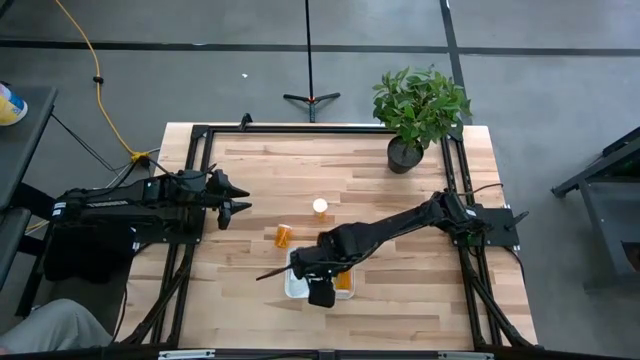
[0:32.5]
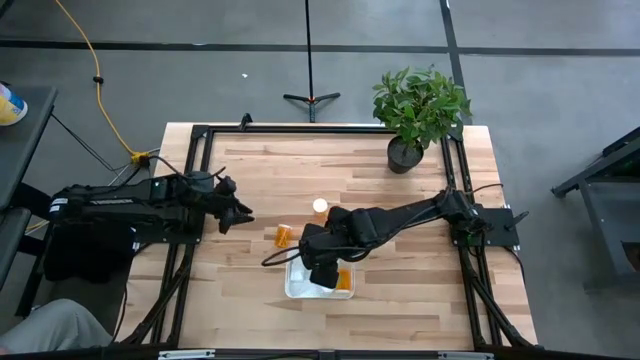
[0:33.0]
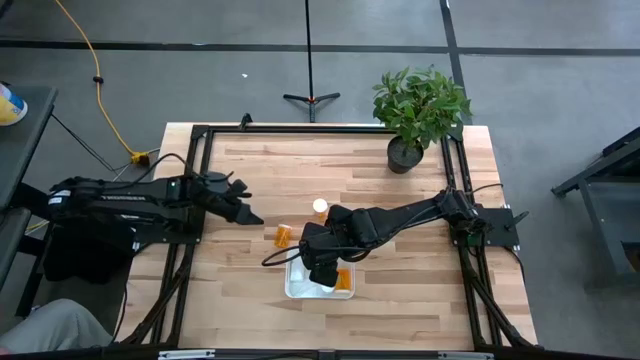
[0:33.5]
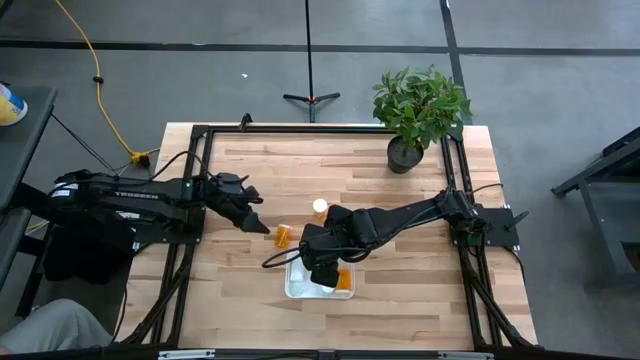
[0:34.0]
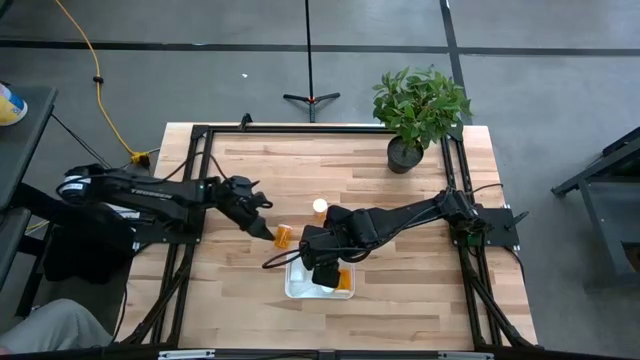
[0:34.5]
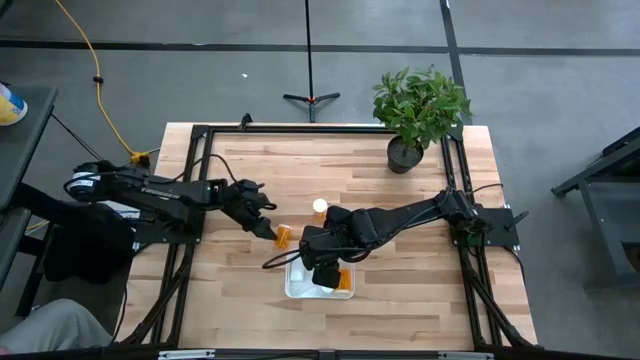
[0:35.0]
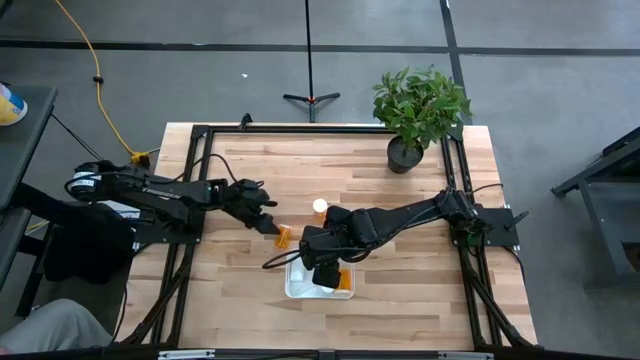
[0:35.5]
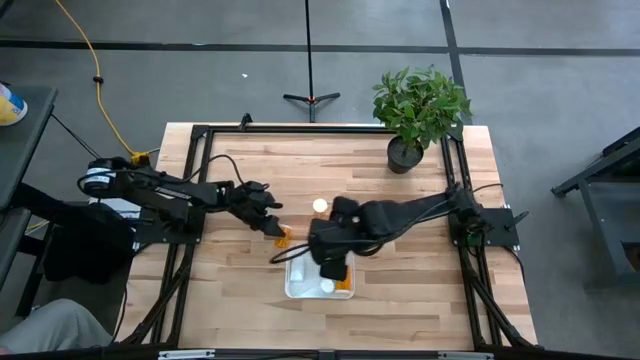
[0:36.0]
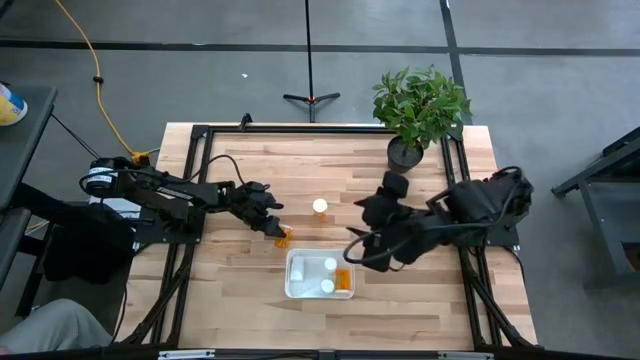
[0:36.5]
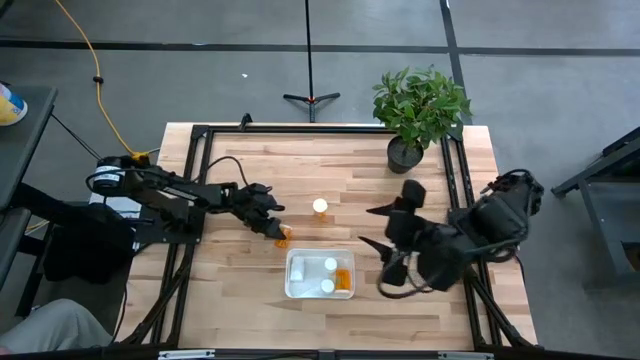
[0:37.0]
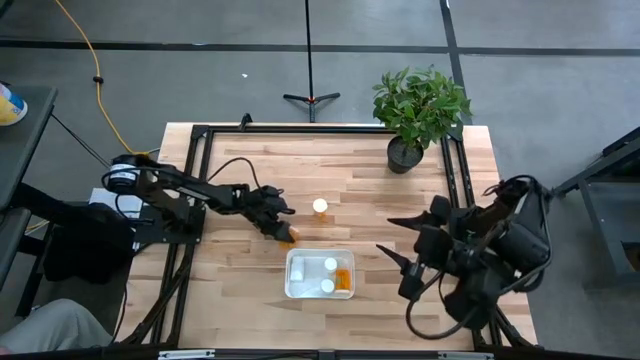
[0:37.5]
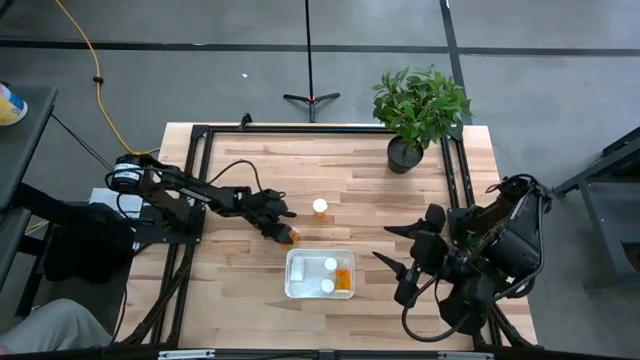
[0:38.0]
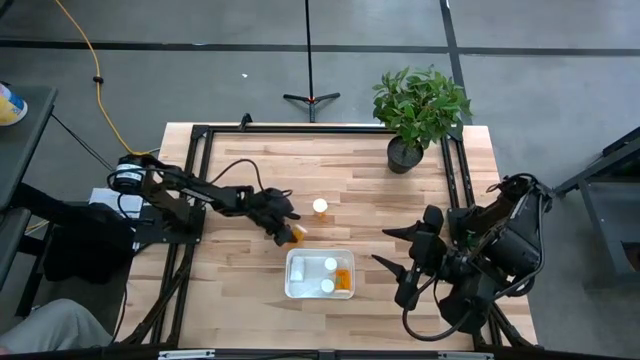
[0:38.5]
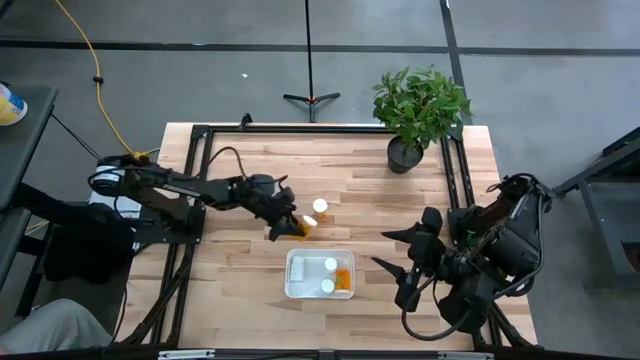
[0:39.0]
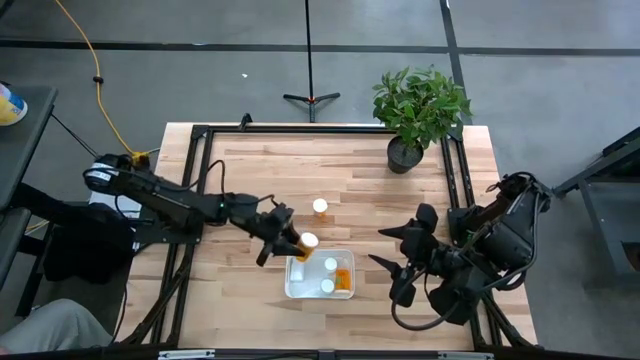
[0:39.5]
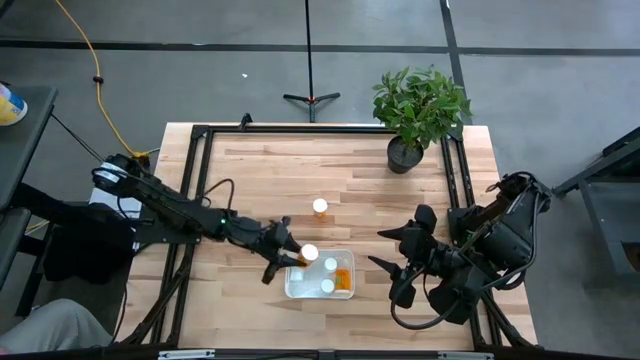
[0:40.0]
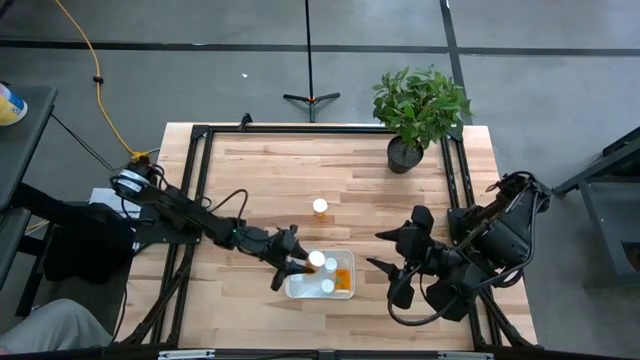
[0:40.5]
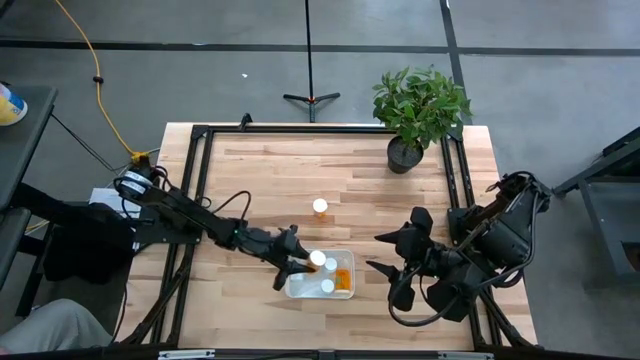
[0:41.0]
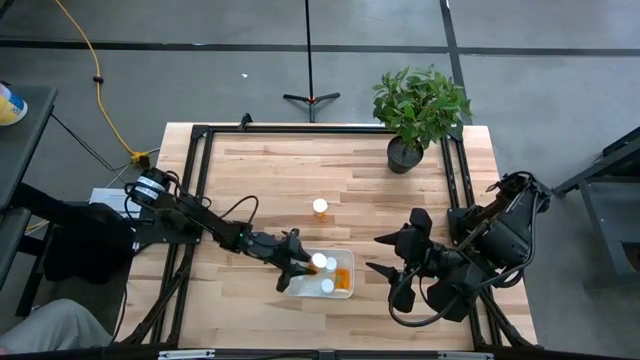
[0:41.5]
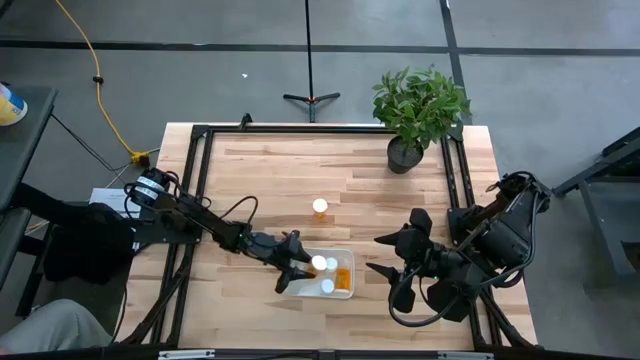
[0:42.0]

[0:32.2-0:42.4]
Task: Pick and place pill bottles into a basket
Put the left orange pill bottle into the white bin

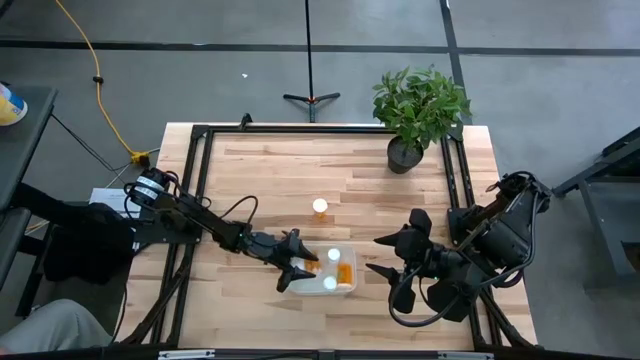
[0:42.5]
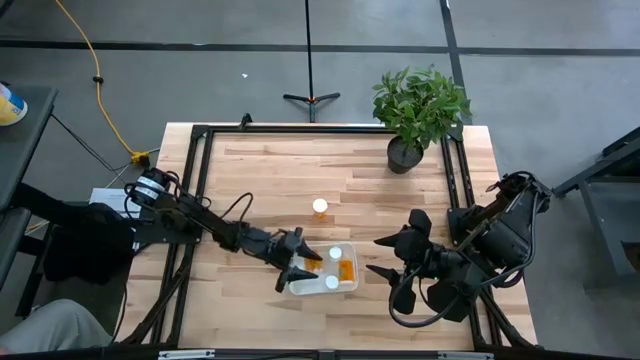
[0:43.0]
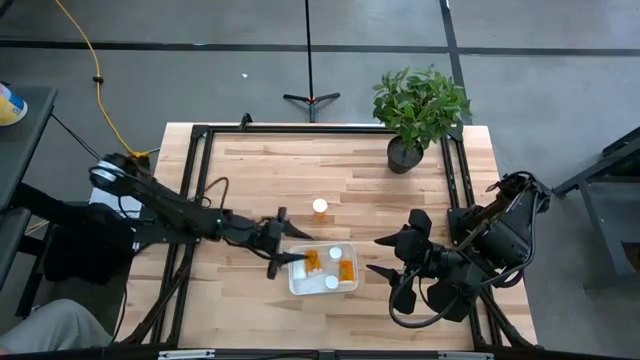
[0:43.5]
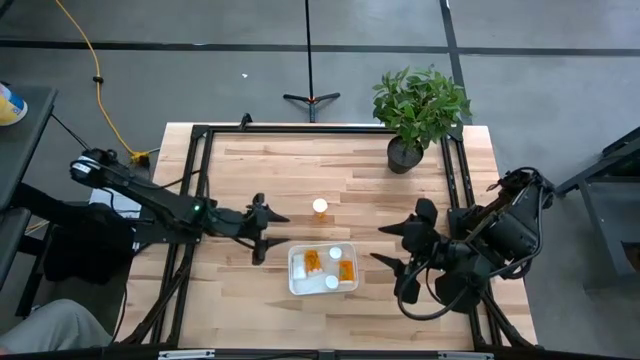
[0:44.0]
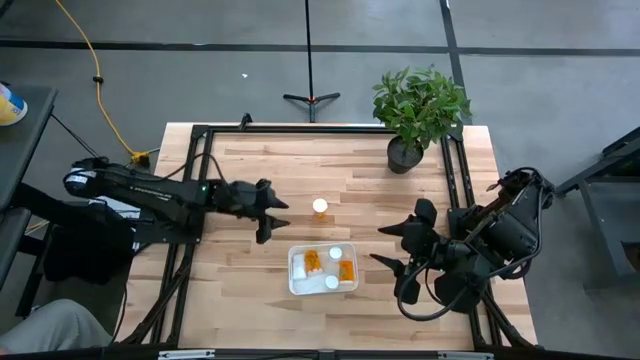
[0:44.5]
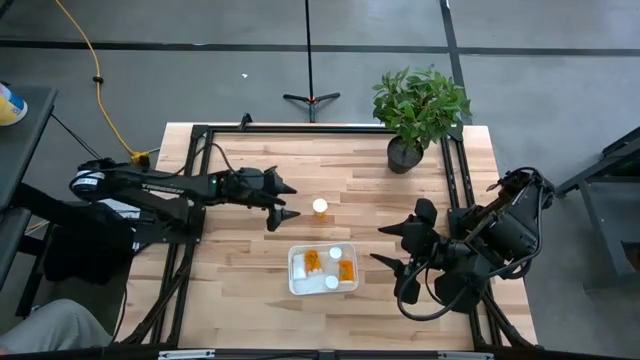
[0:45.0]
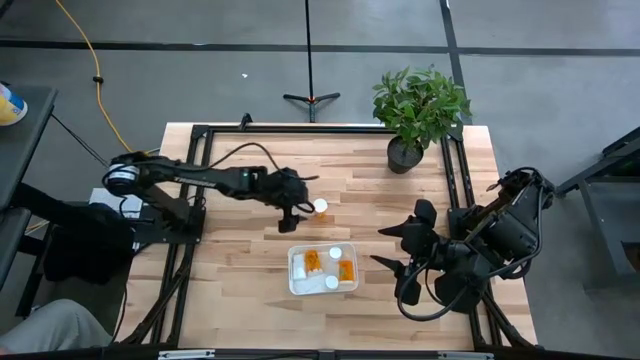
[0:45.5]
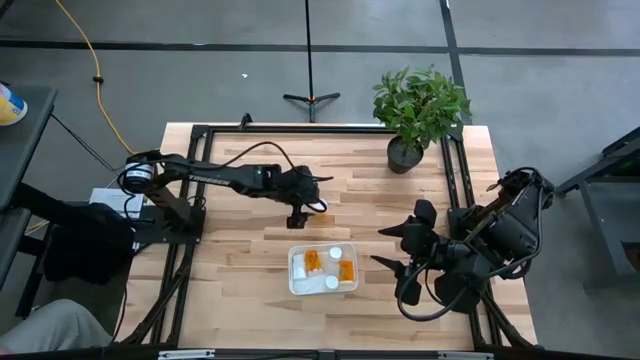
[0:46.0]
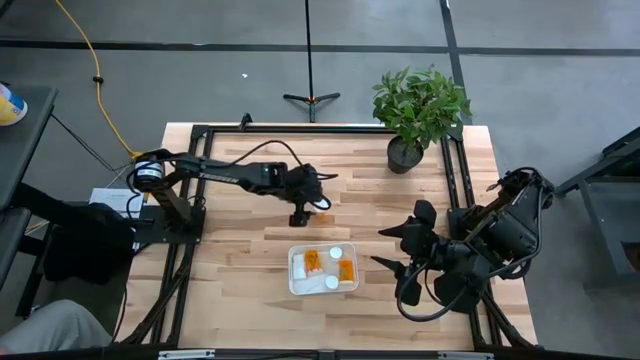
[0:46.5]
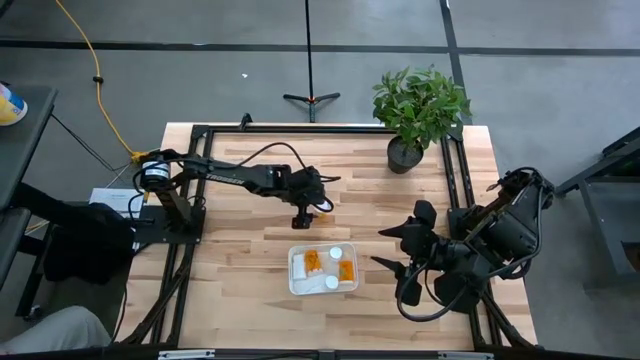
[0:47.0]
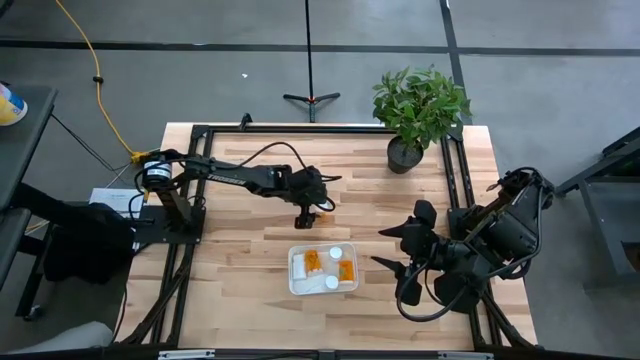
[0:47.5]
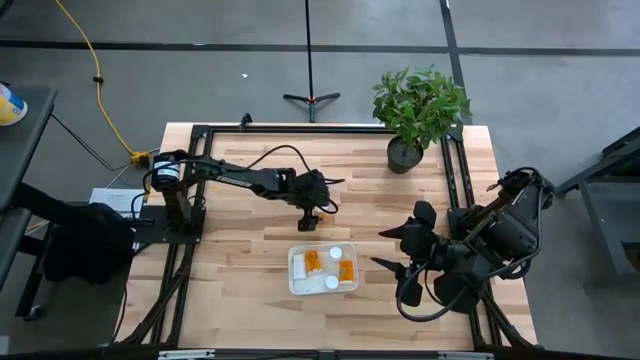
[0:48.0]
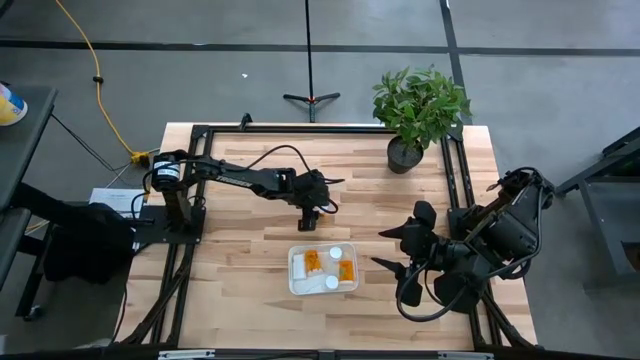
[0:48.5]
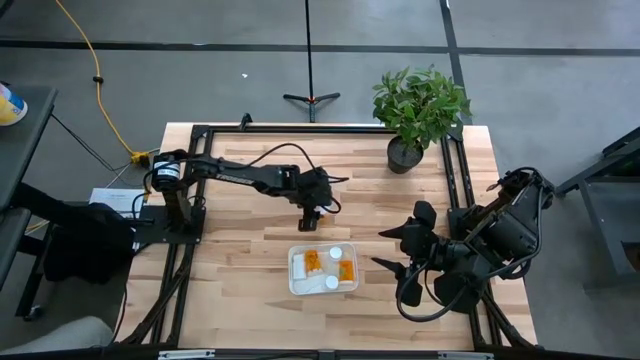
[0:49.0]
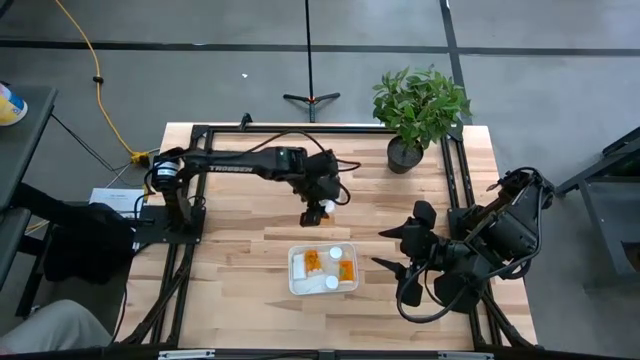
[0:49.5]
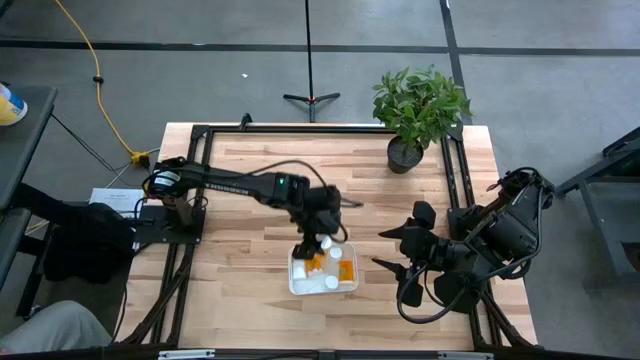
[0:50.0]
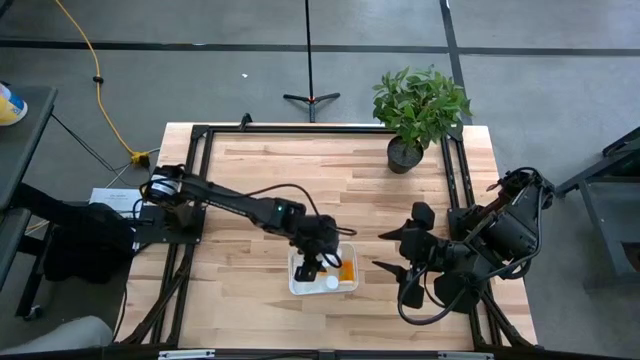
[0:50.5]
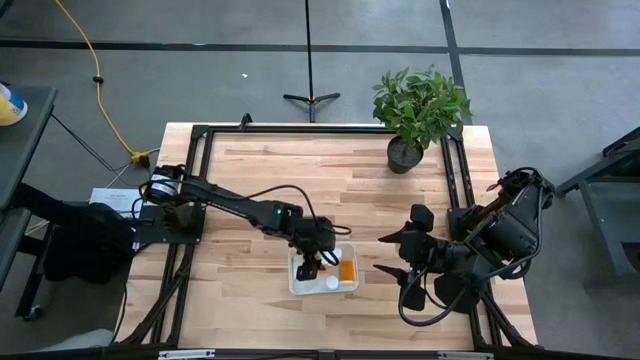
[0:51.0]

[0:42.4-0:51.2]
Put the orange pill bottle into the white bin

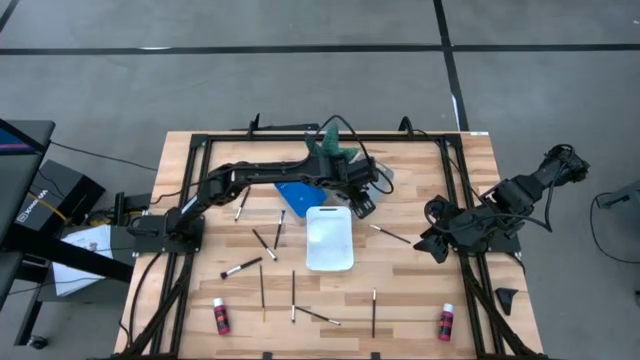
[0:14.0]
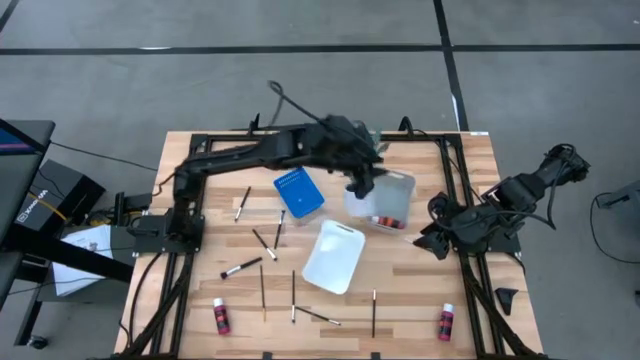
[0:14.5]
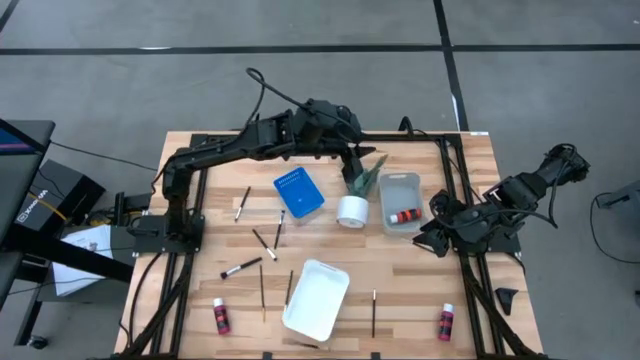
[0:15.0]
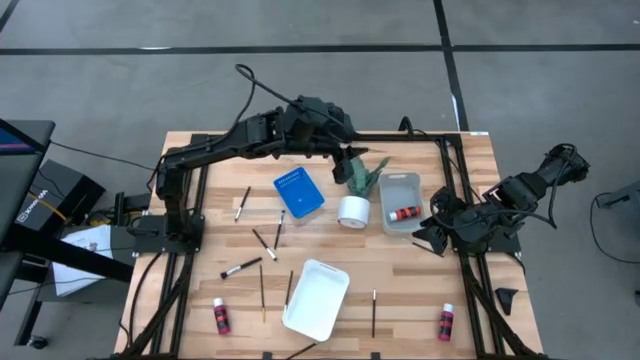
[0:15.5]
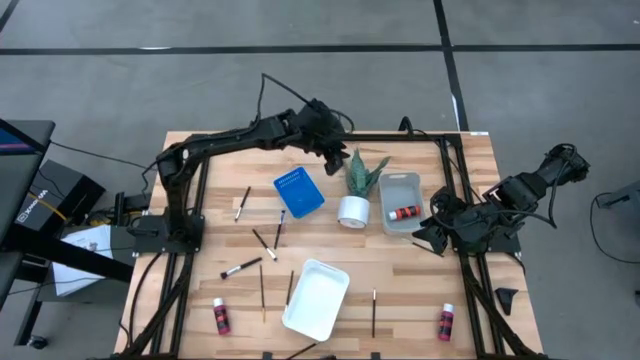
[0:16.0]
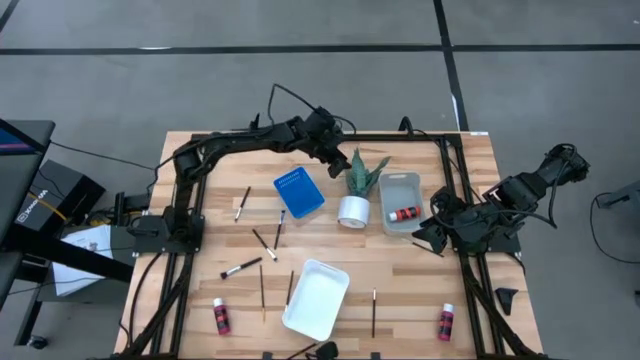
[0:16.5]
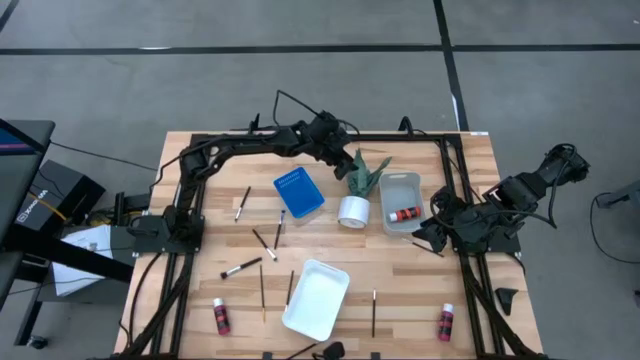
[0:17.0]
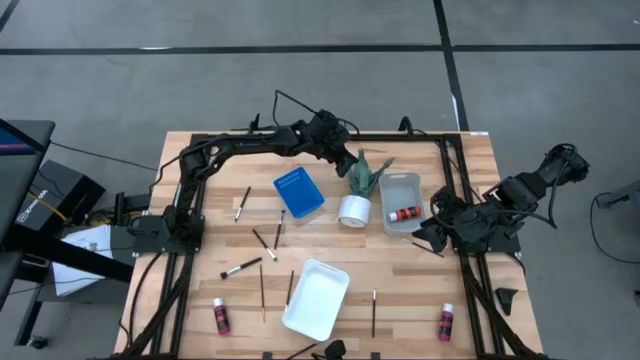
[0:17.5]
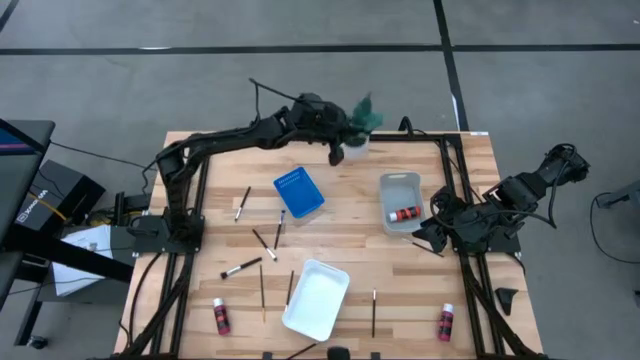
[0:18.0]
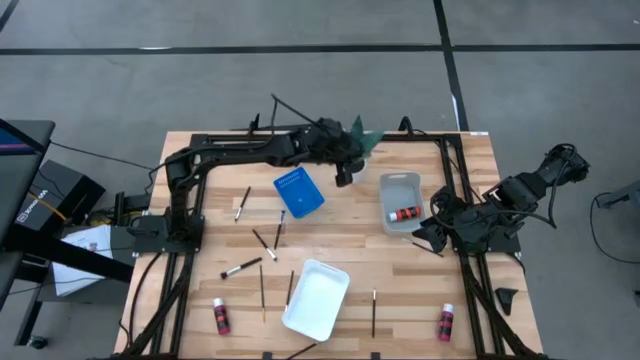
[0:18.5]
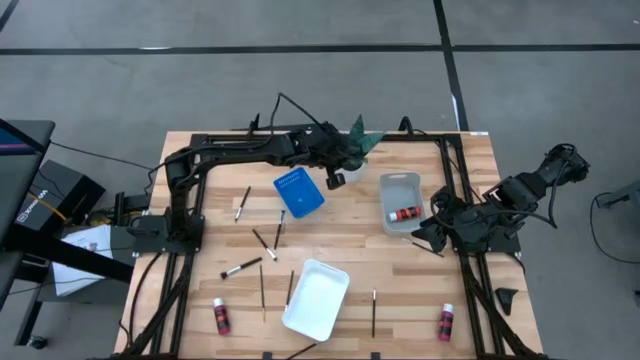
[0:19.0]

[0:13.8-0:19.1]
Task: Pick & Place Paint Supplies
Adjust the white potted plant
